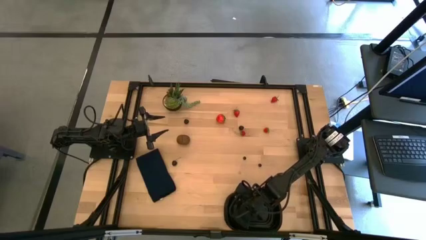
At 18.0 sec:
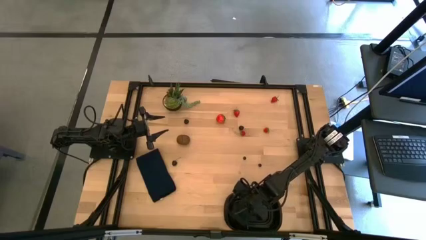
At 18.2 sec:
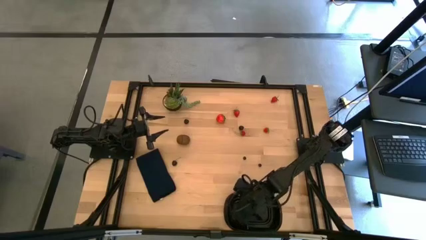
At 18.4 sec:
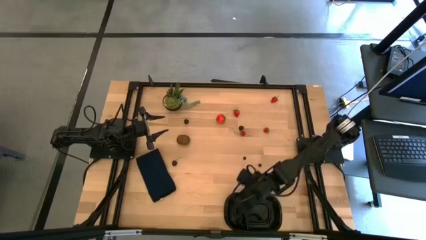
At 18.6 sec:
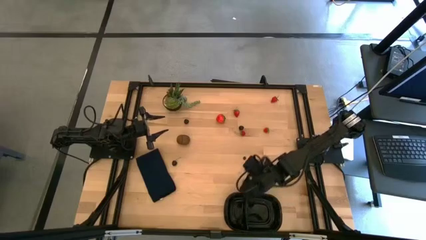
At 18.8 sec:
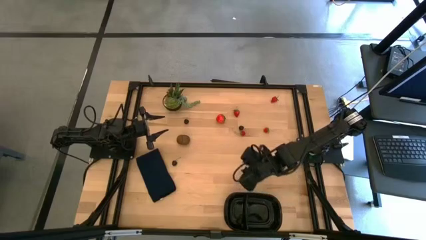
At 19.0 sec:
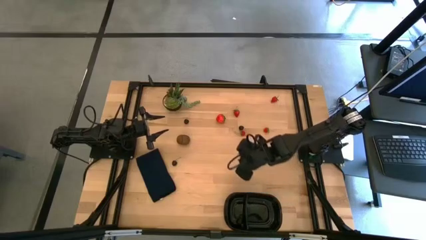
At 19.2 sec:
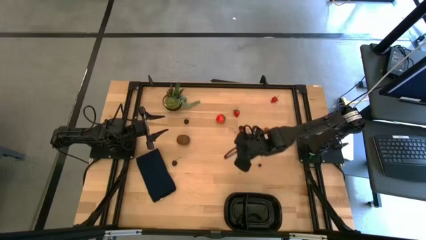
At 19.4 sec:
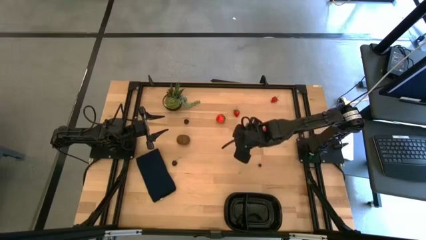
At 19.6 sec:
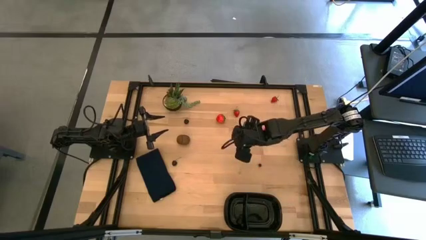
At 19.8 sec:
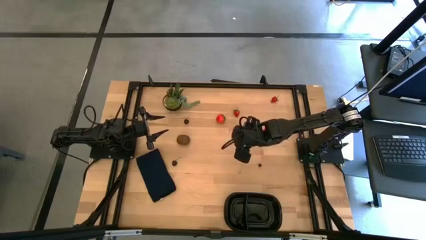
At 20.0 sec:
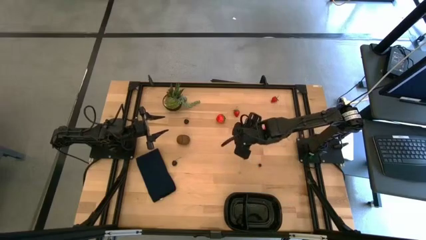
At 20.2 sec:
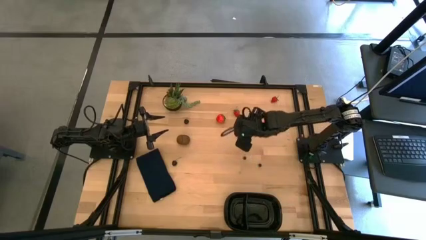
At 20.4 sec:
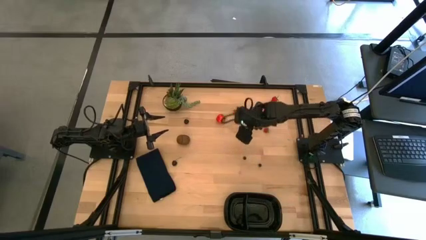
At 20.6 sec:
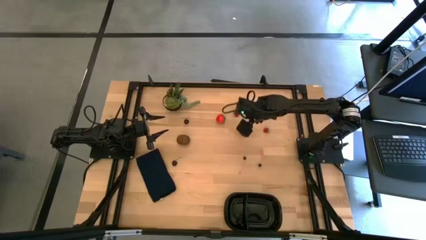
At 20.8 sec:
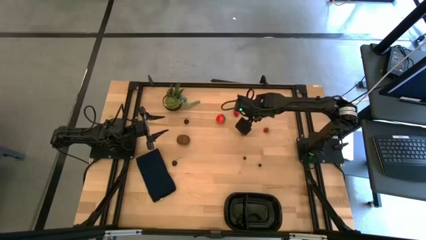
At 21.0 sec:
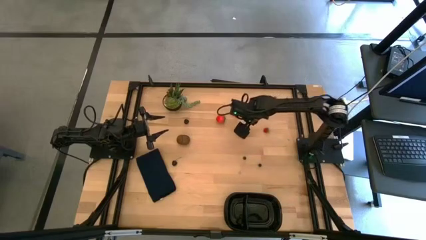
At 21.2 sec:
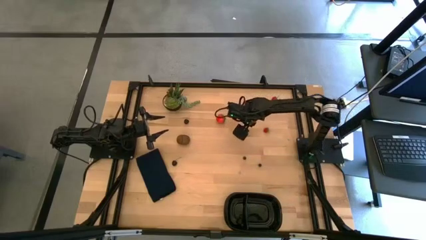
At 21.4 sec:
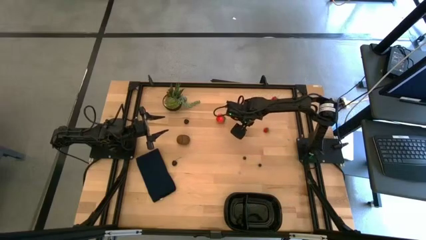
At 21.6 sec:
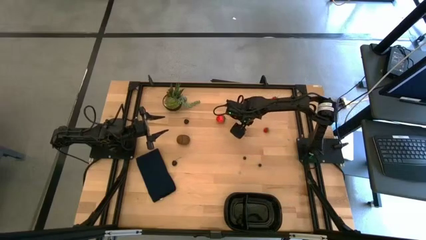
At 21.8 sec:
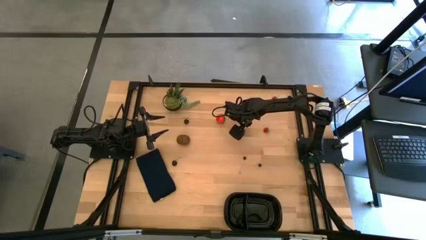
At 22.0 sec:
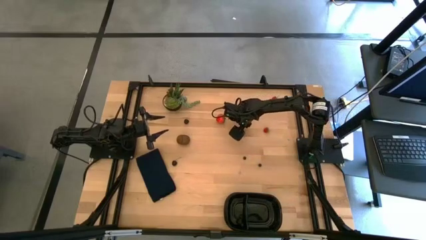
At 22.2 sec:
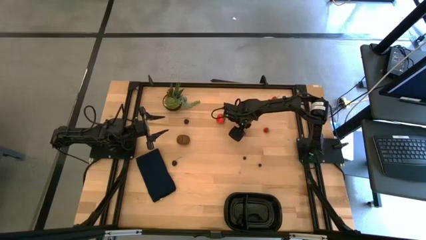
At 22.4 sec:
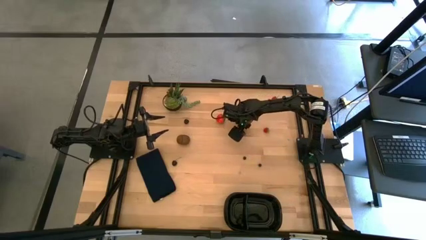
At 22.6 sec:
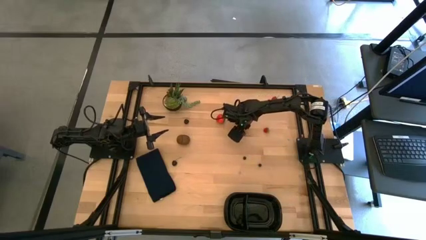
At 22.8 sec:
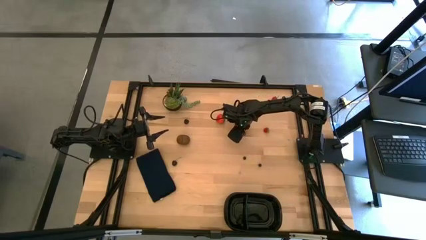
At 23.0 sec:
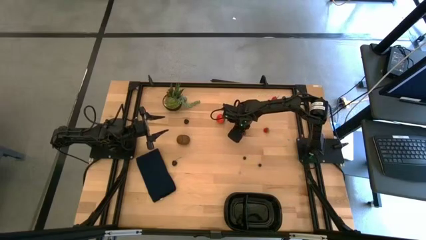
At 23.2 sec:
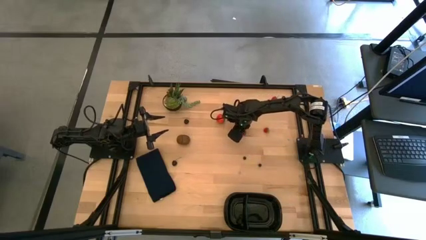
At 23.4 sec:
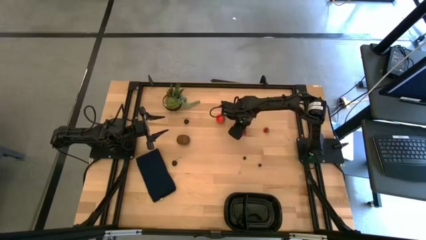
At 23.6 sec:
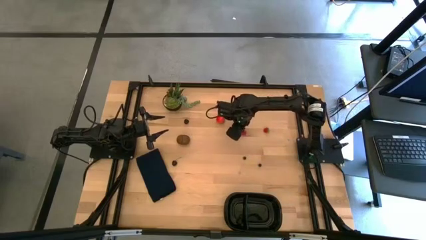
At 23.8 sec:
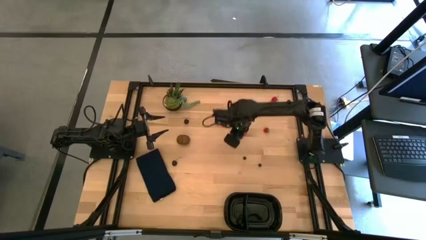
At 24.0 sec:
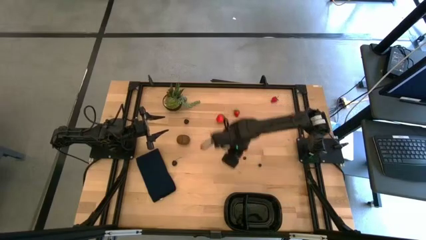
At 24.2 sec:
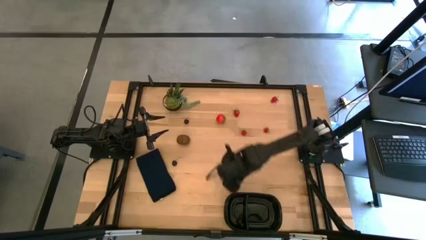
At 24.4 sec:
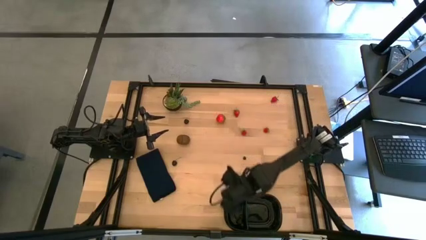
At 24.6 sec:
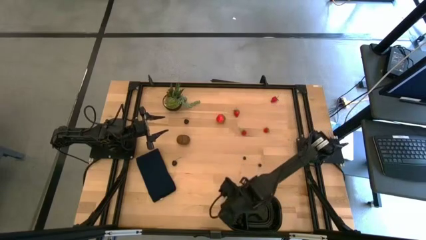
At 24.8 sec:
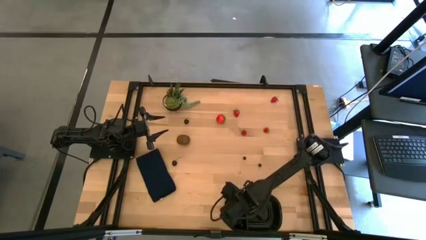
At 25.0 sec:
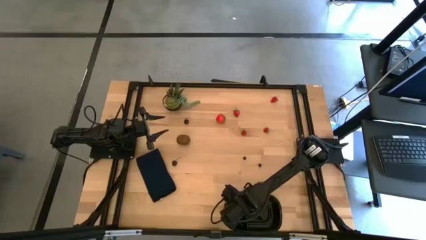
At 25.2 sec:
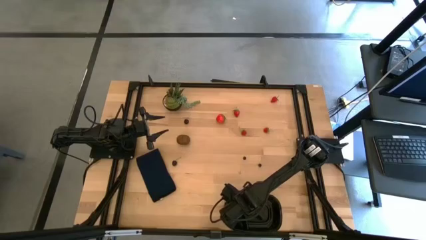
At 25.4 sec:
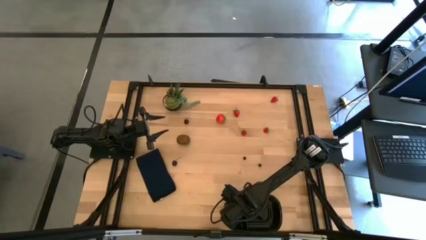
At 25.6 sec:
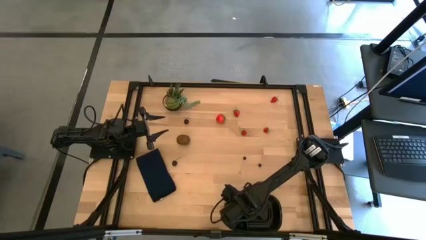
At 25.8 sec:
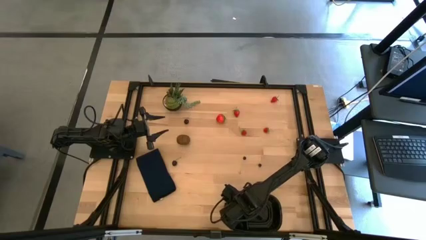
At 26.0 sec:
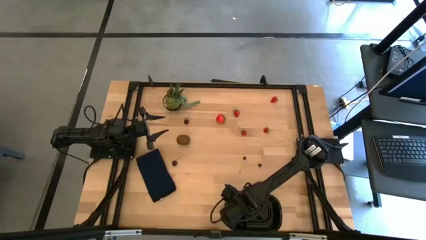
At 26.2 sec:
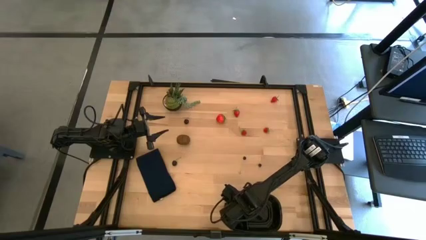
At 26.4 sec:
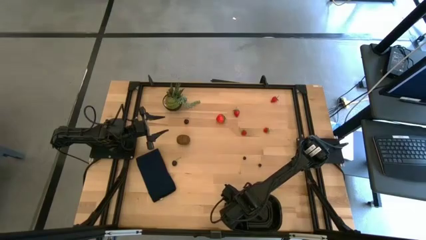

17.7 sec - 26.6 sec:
Task: Pick and placing Produce into tupperware
Put the blackberry into the black container

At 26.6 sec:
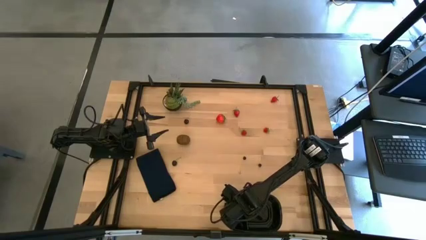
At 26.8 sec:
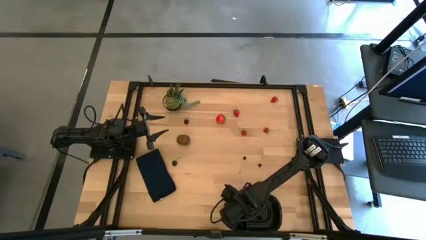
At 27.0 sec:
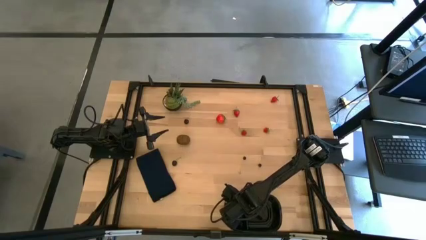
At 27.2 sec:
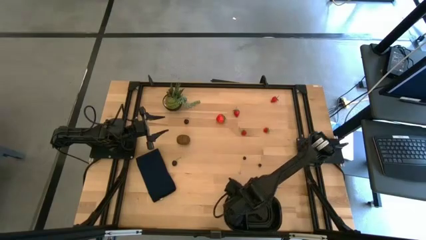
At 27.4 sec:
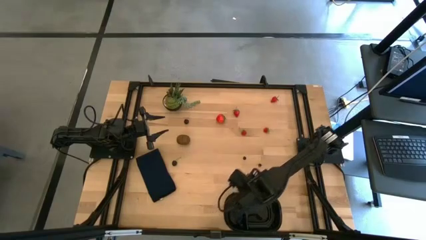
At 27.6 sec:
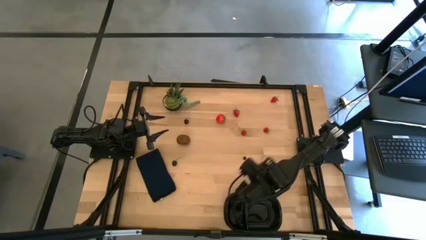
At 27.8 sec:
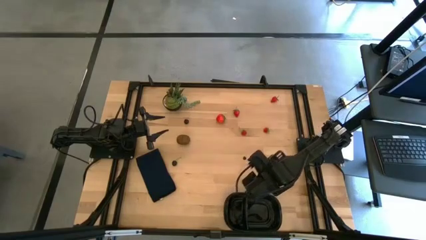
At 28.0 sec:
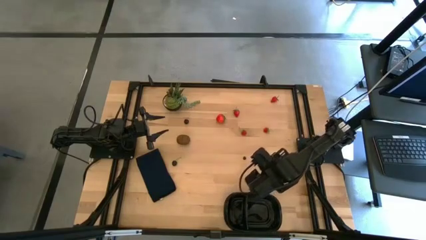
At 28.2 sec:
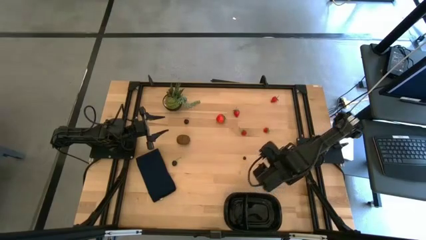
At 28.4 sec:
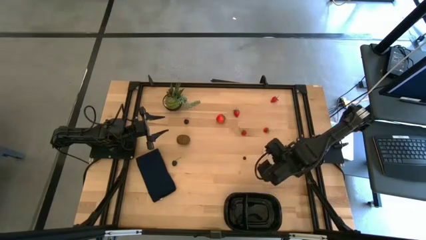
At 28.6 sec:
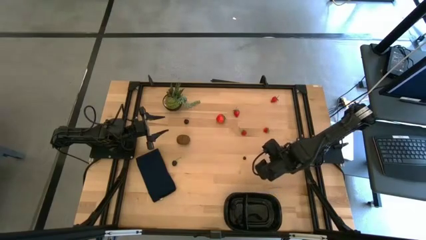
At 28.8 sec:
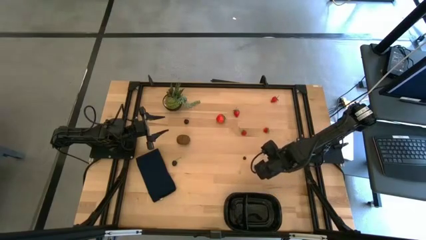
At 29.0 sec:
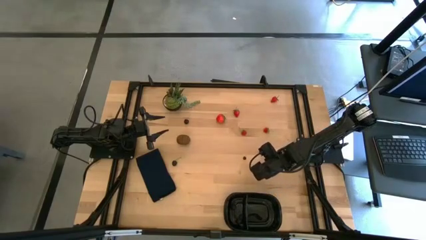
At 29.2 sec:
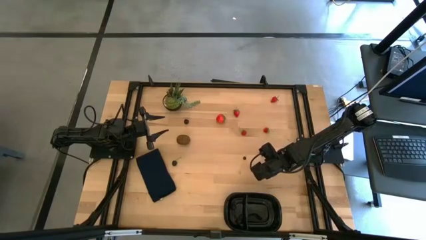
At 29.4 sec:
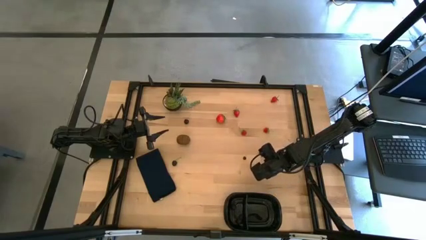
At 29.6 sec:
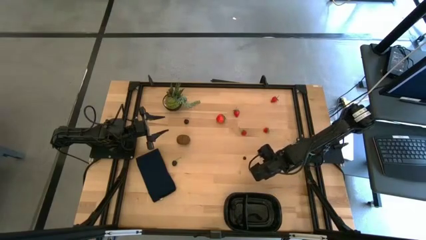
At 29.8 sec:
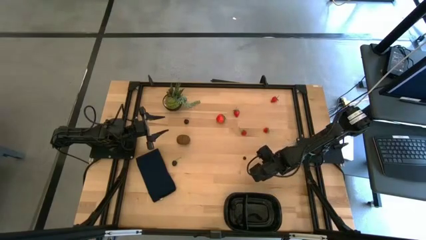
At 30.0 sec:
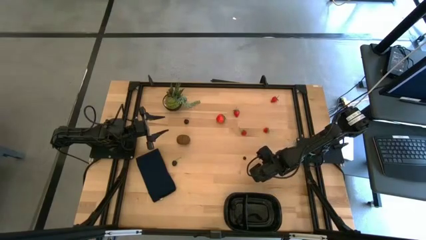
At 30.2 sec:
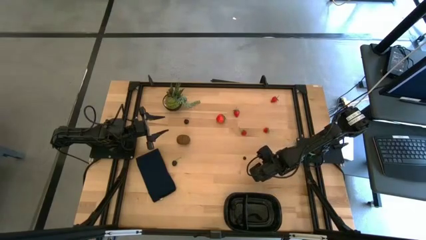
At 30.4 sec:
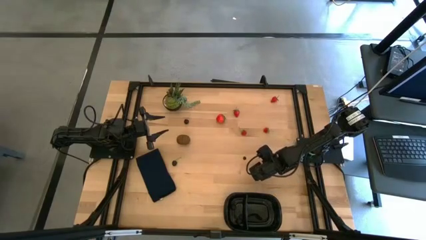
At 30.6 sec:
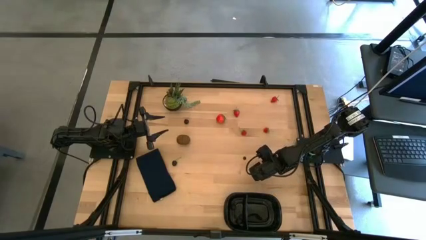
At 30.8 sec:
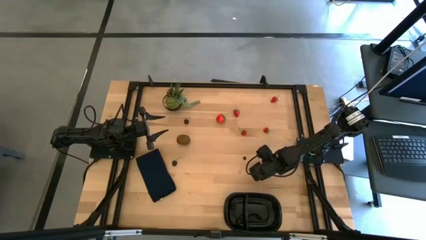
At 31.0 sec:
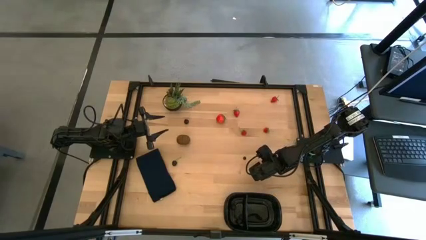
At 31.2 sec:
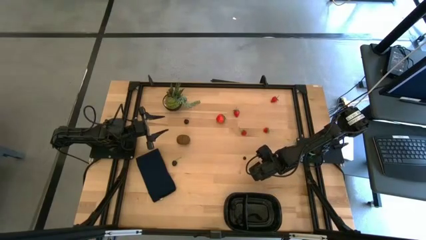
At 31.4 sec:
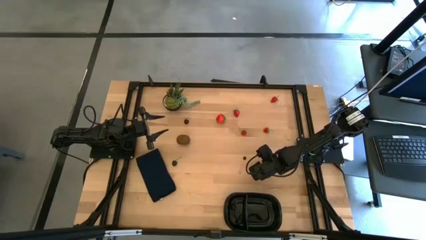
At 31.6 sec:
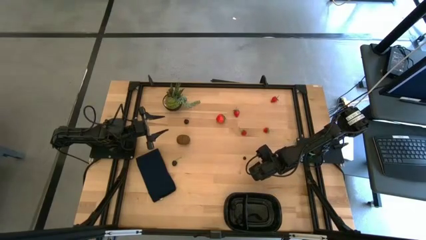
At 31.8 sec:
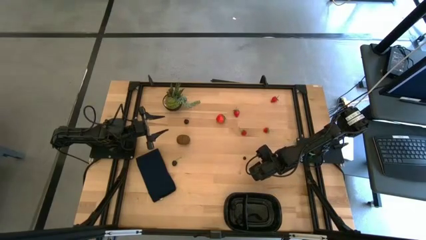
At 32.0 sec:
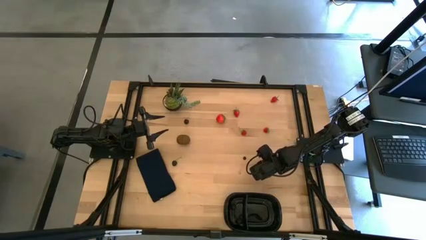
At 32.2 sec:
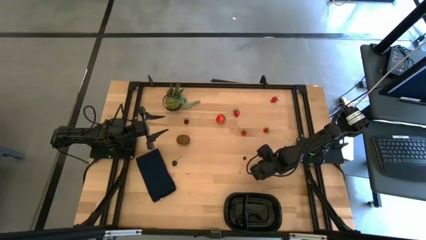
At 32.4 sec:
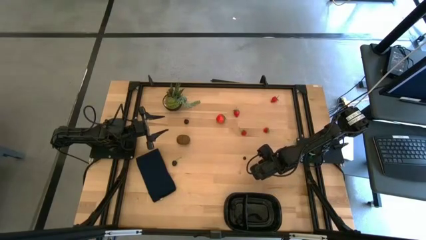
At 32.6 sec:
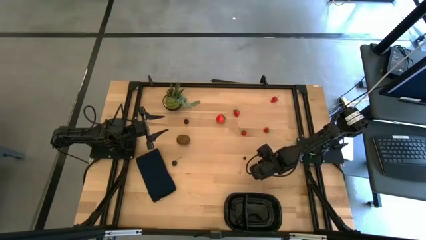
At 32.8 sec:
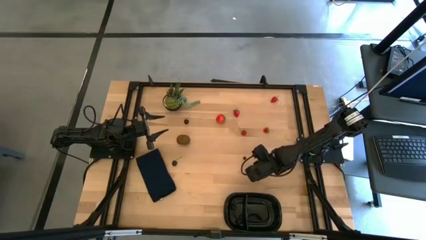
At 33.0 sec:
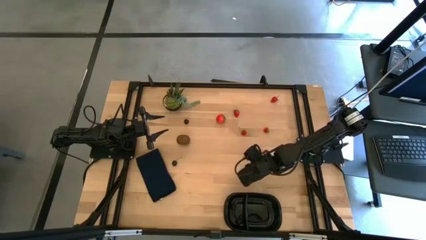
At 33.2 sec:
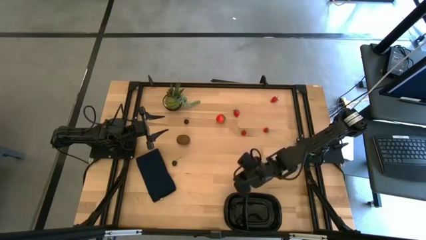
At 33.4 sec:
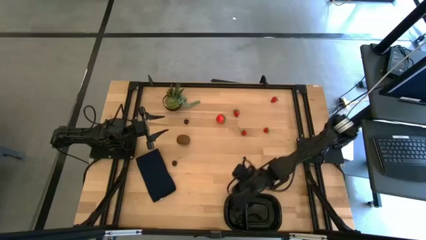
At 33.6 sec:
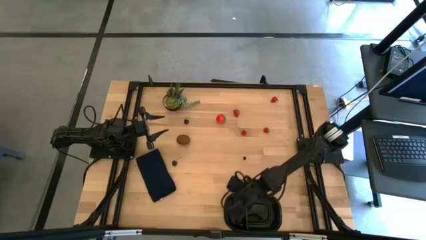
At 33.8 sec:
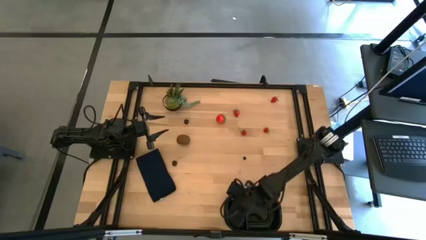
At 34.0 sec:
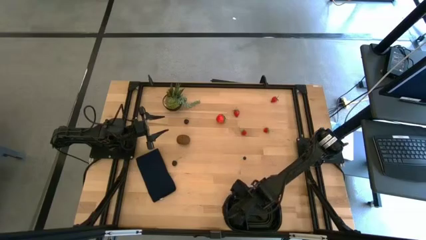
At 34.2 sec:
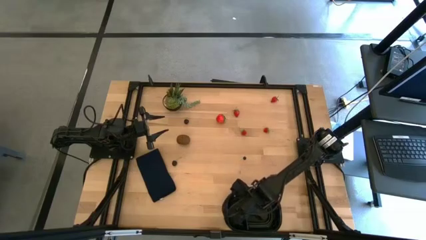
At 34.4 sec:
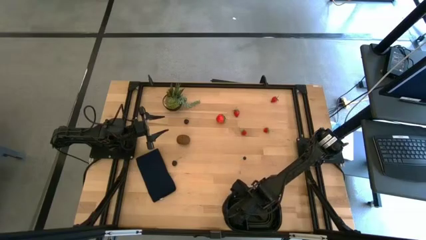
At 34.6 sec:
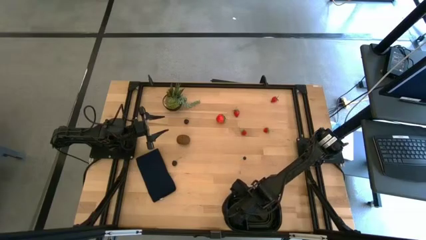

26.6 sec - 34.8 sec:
Put the blueberry into the black container
